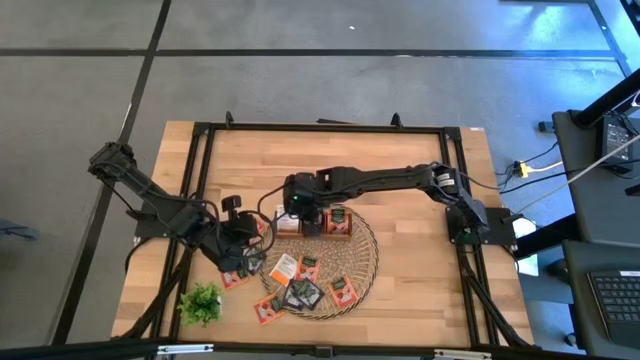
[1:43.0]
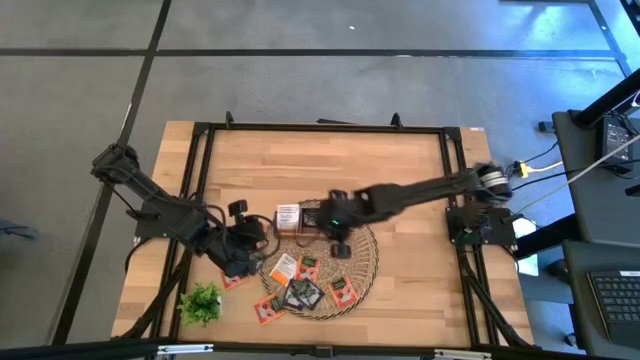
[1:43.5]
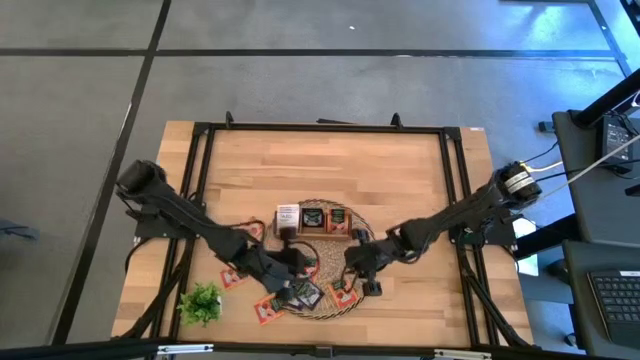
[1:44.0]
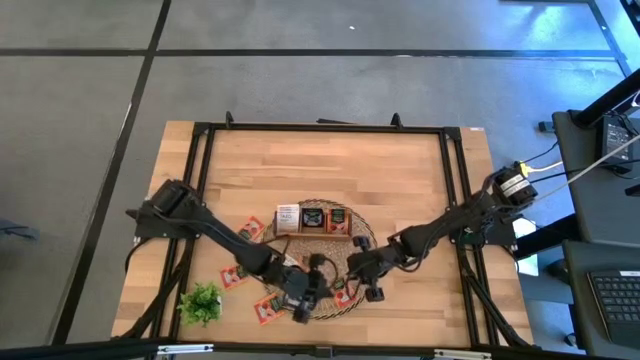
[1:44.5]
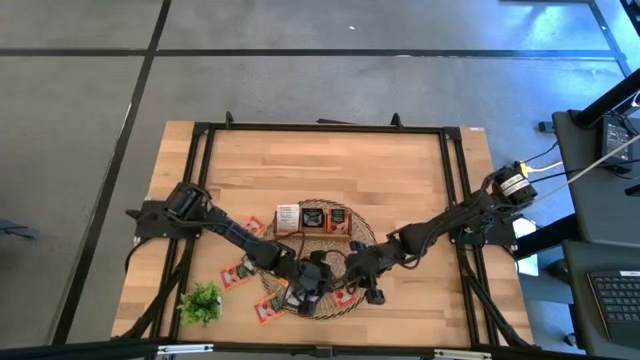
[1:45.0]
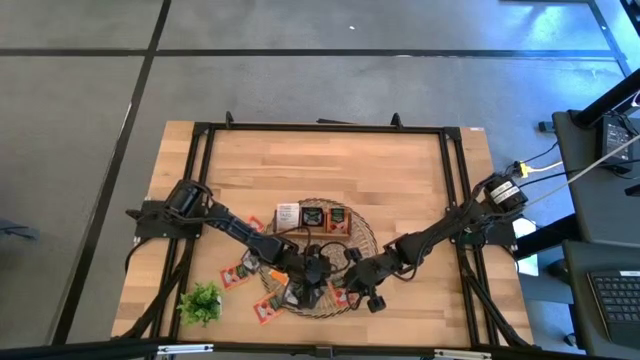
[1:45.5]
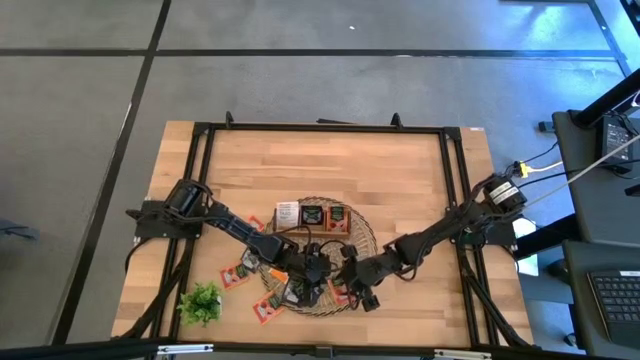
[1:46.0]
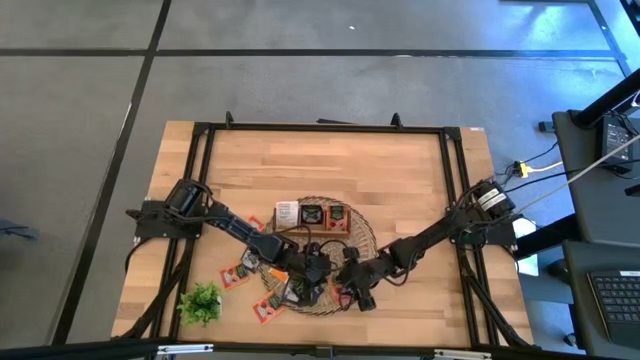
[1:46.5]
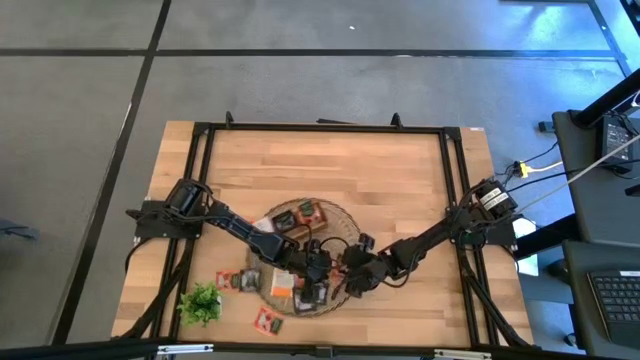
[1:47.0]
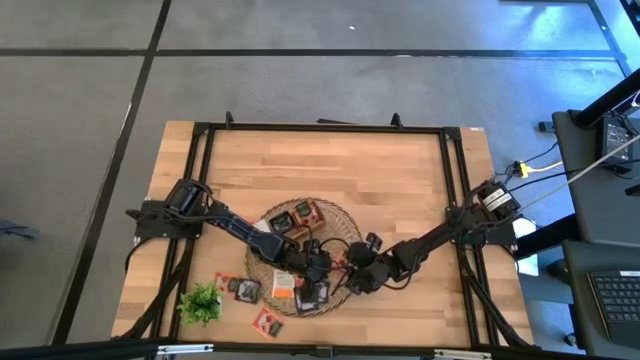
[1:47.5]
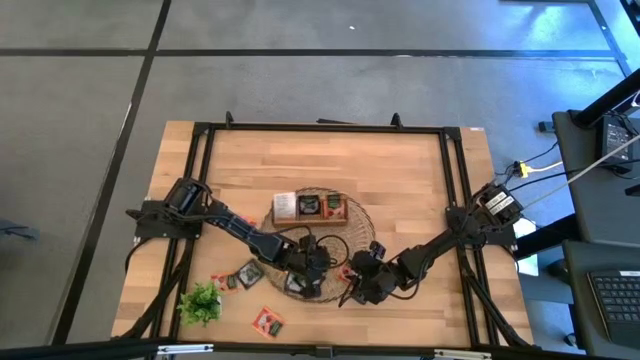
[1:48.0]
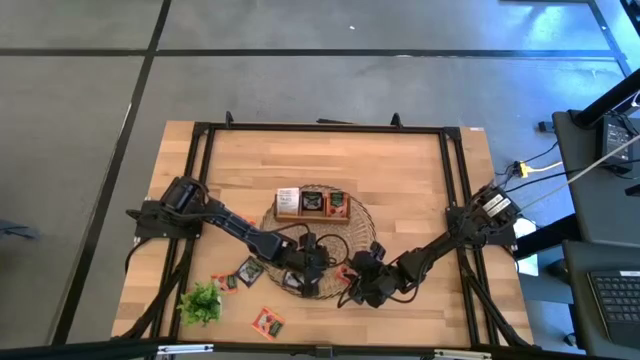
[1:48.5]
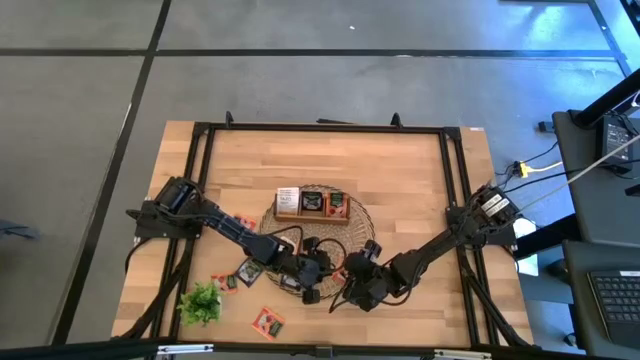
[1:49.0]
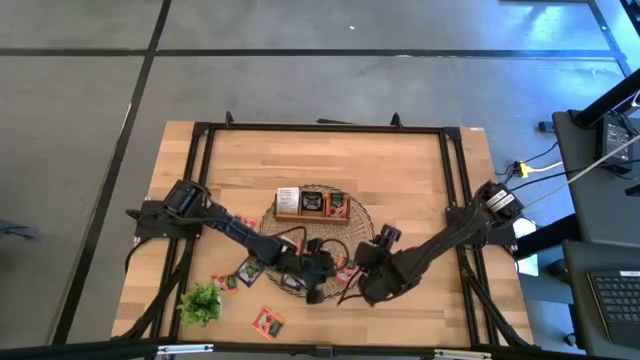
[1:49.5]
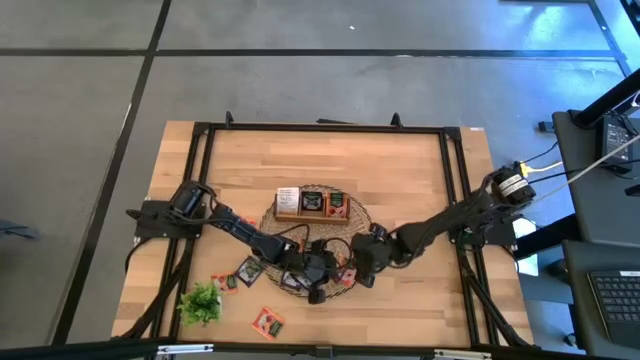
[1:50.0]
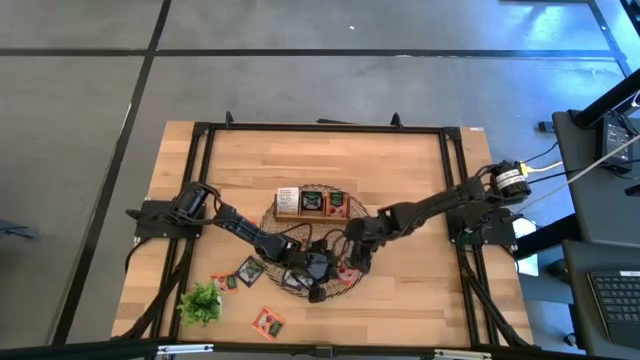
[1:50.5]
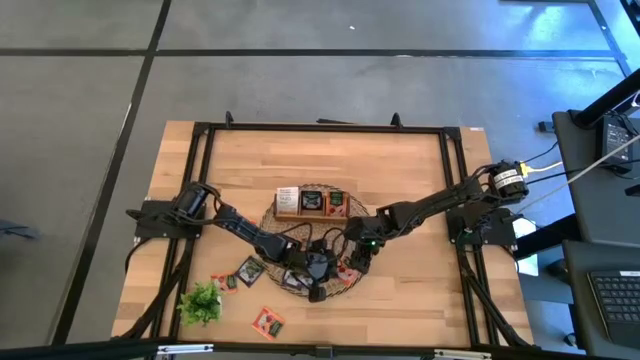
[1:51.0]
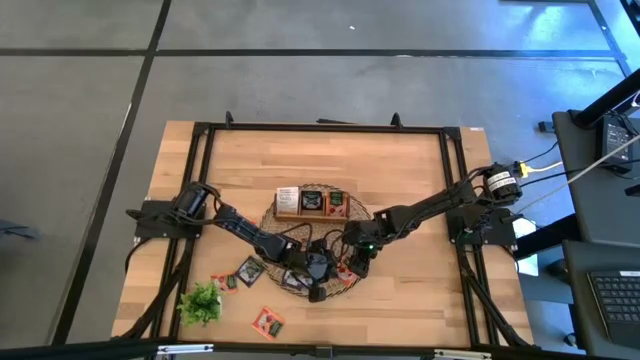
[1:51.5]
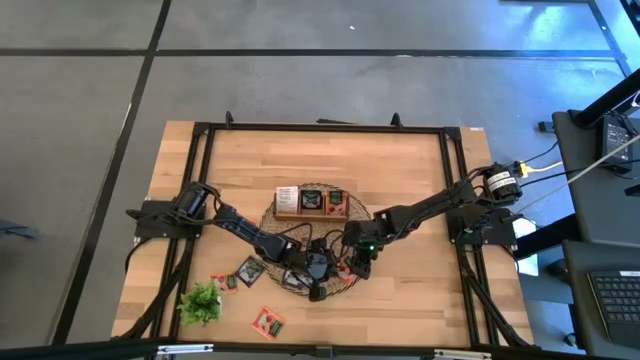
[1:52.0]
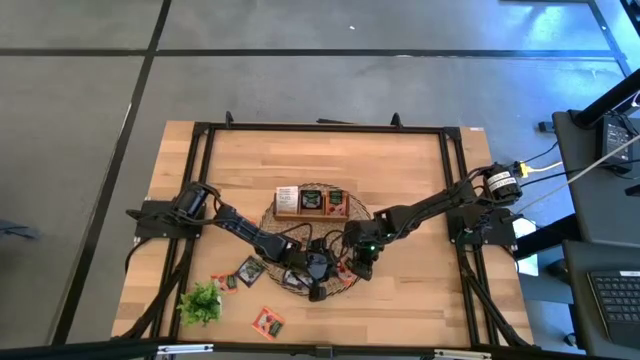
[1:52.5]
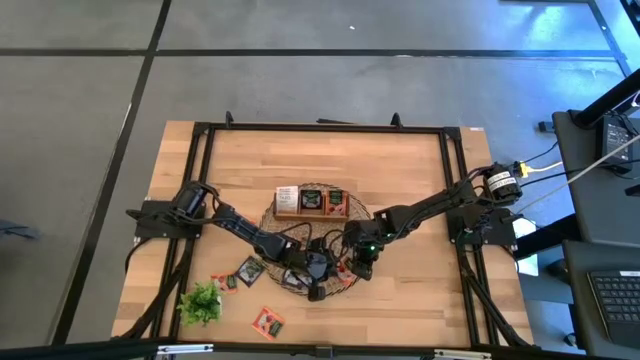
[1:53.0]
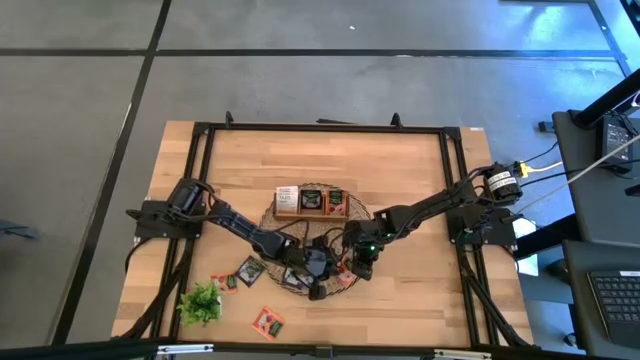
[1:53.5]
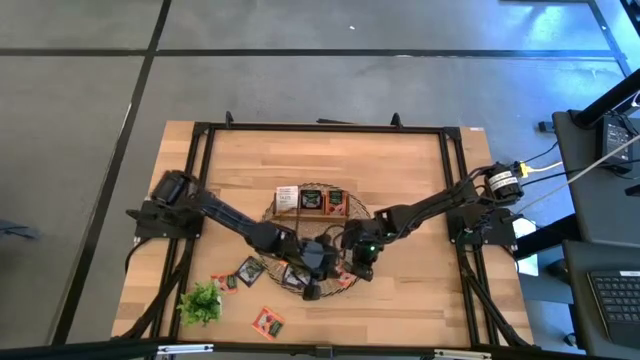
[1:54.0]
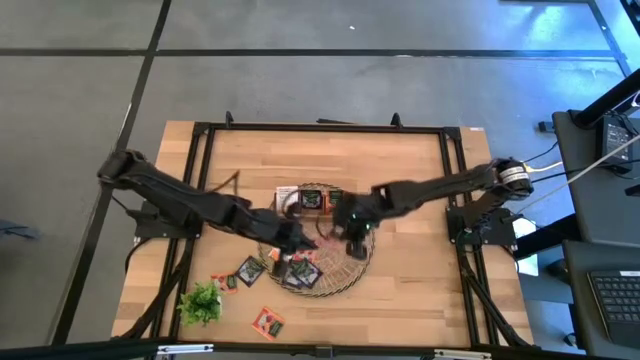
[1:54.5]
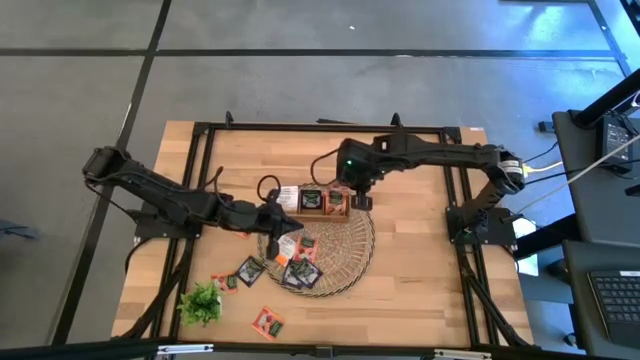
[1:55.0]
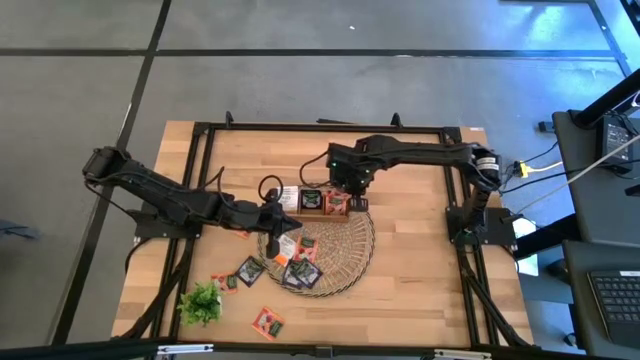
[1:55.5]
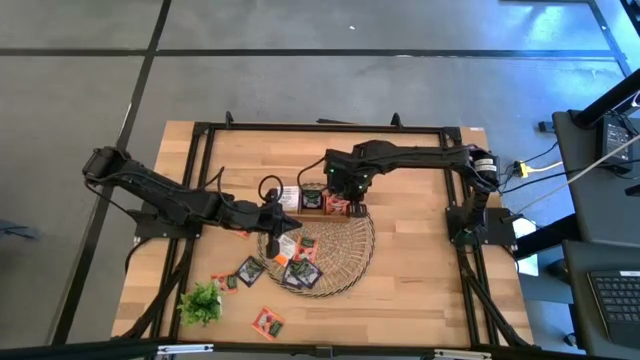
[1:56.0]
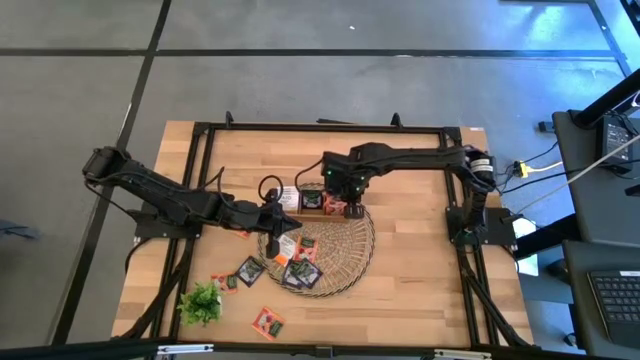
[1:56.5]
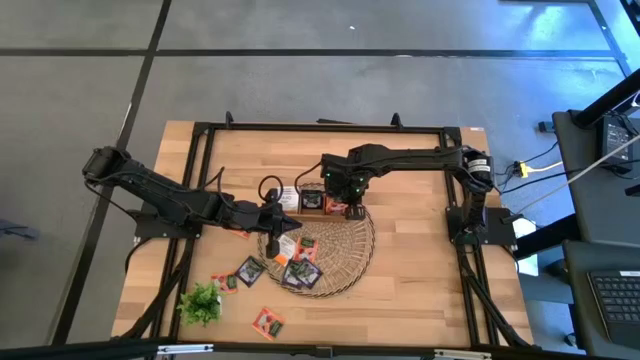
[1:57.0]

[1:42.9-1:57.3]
Task: Pick & Place Tea
Put the orange tea bag into the right slot of the wooden organizer

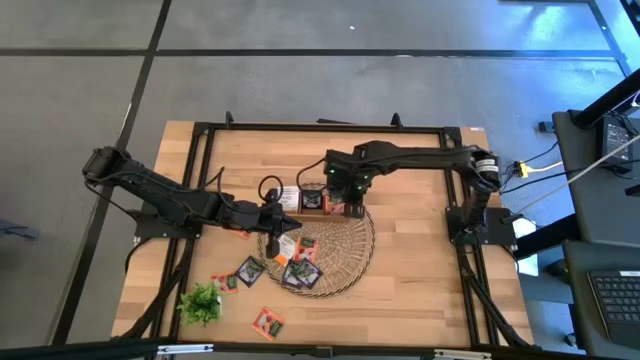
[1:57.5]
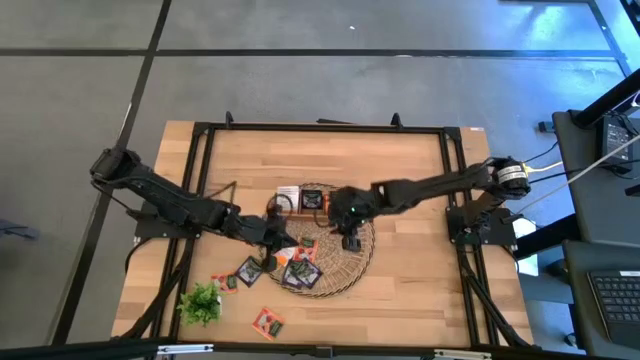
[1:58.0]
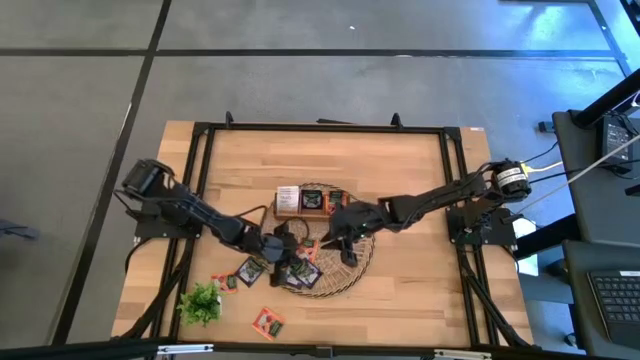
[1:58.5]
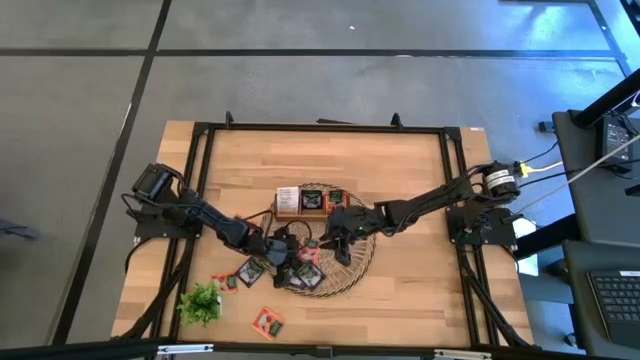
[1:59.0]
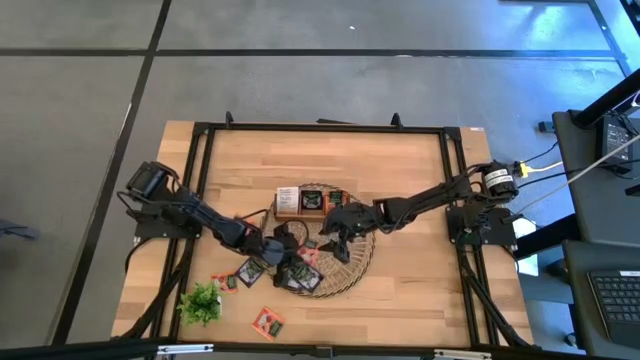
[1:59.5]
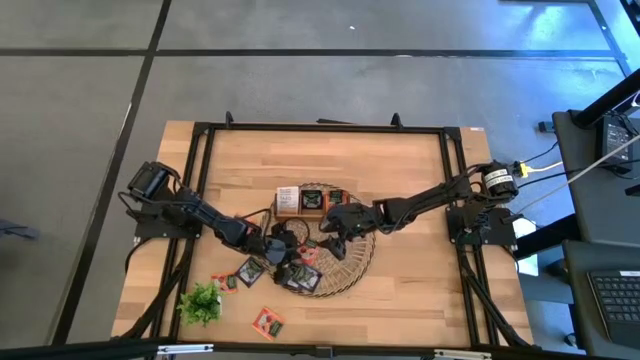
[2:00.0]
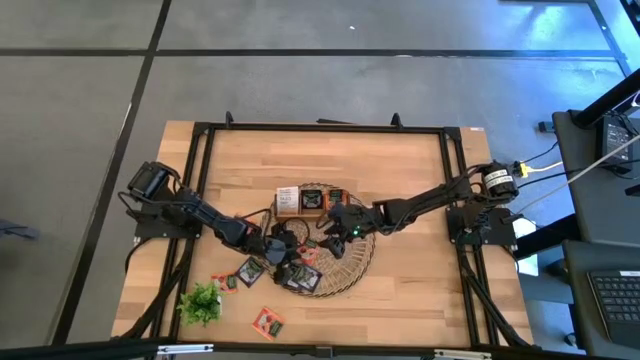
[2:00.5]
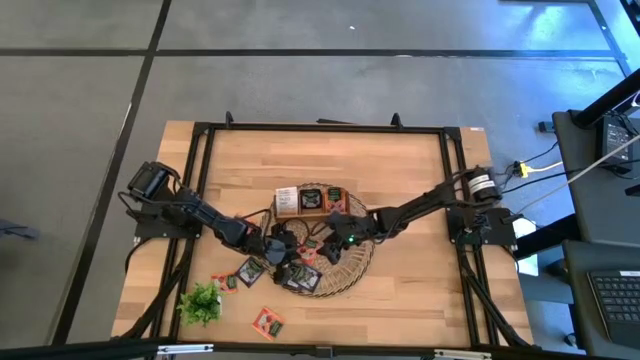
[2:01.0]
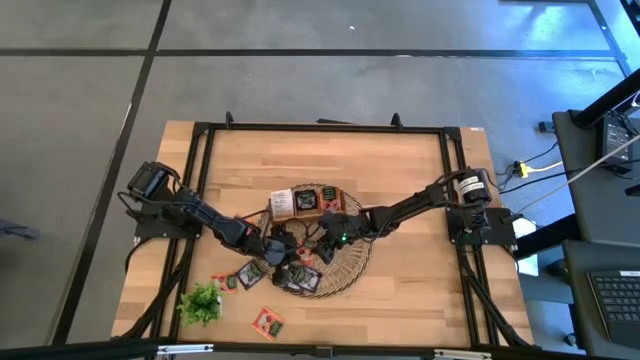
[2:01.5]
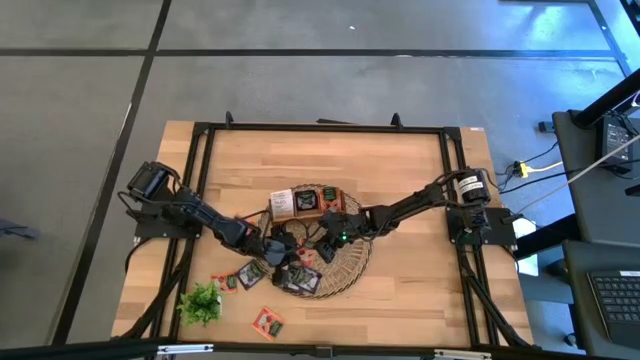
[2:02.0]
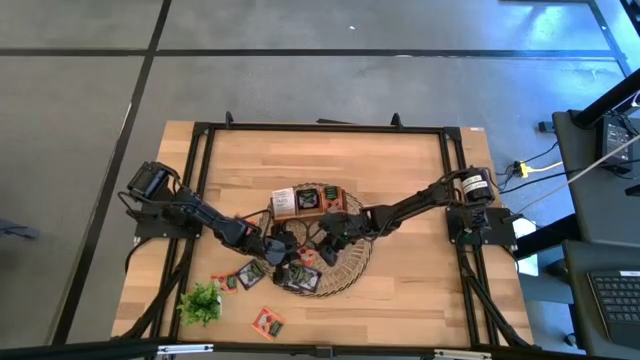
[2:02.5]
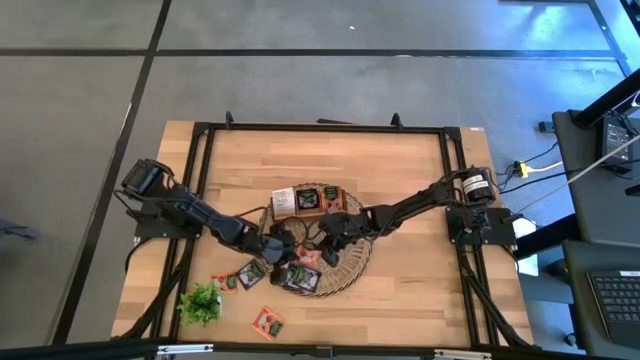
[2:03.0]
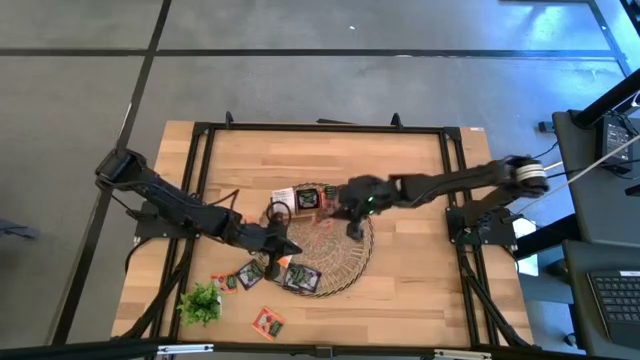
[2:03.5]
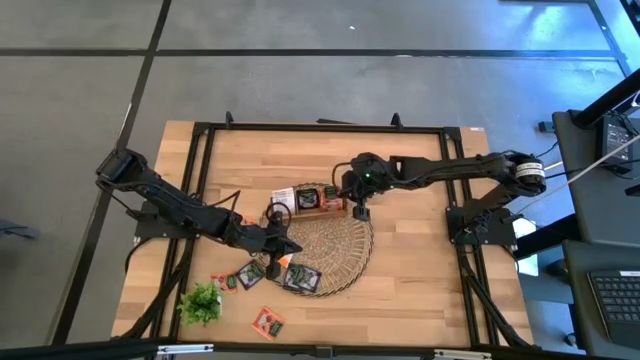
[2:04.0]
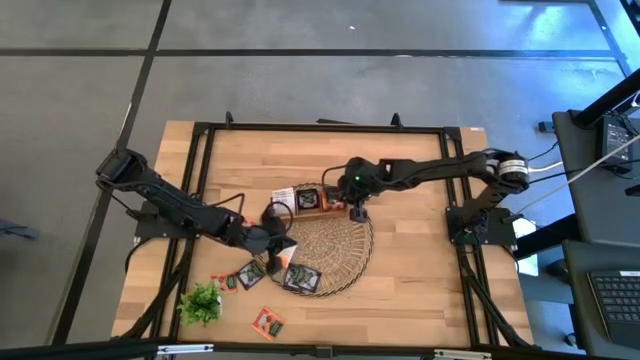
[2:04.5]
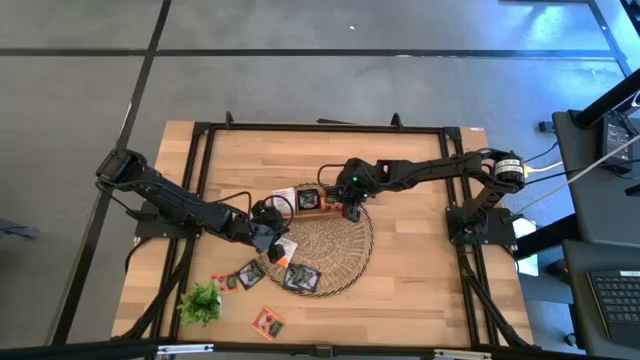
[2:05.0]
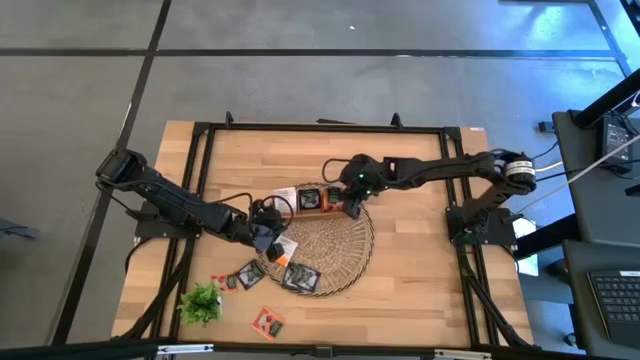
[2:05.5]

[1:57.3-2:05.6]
Put the orange tea bag into the right slot of the wooden organizer
